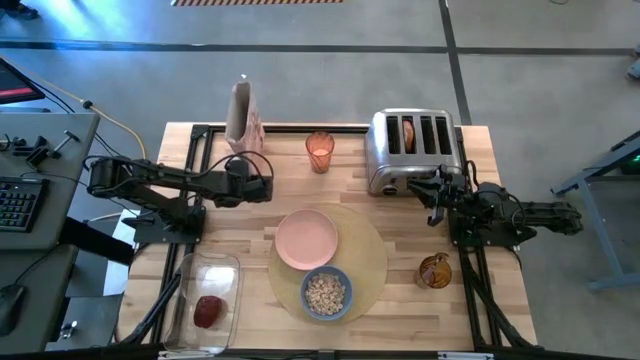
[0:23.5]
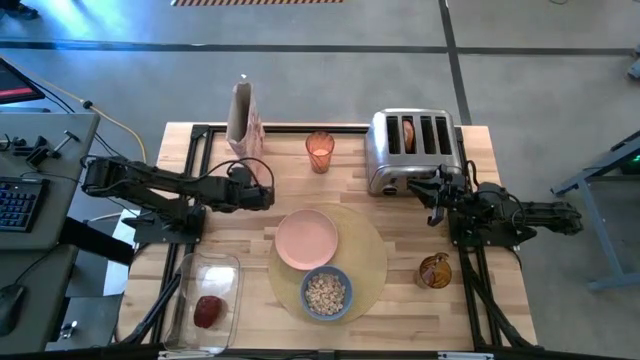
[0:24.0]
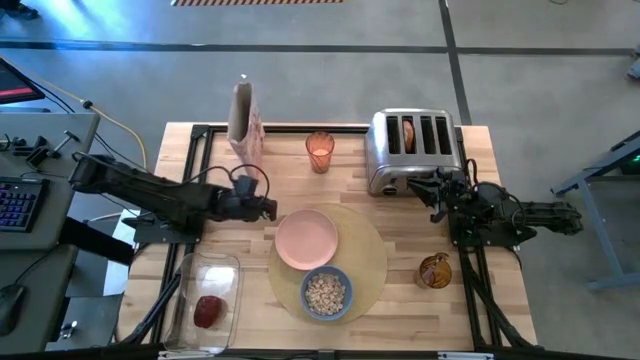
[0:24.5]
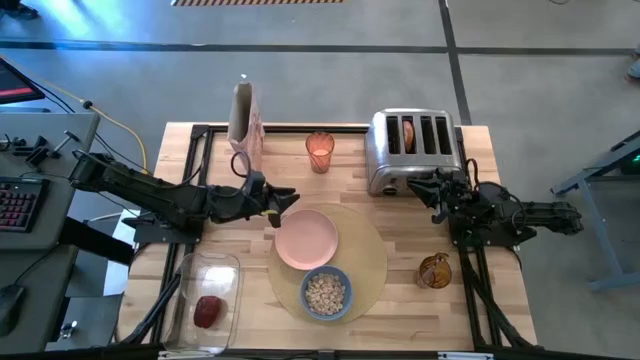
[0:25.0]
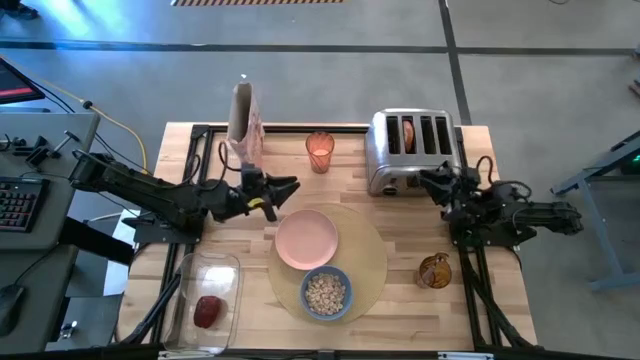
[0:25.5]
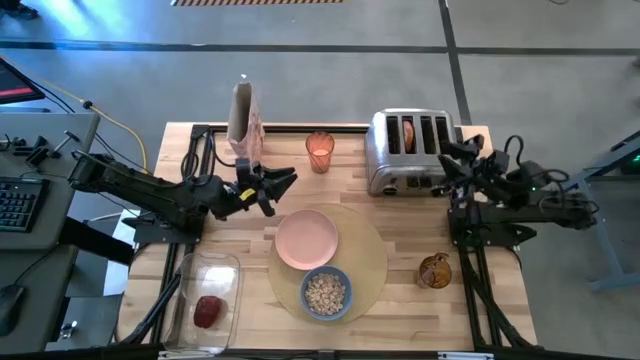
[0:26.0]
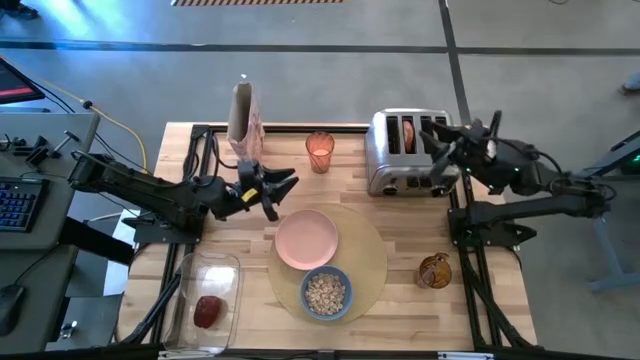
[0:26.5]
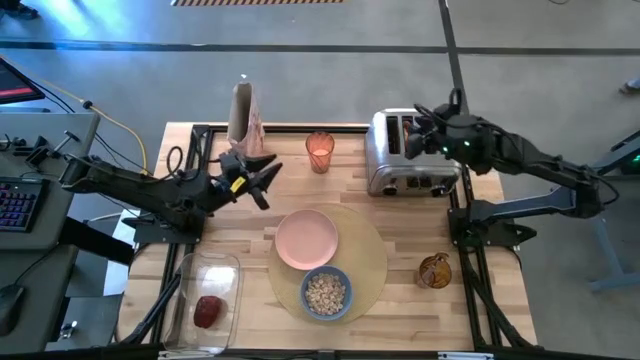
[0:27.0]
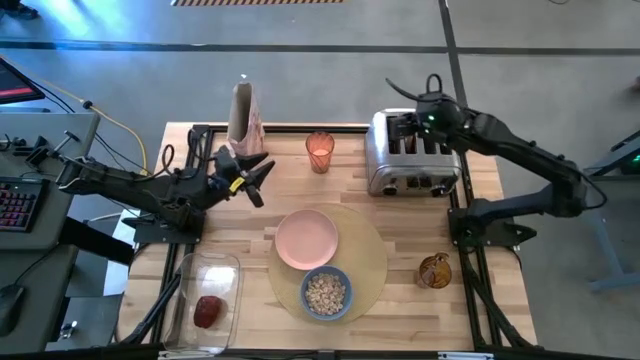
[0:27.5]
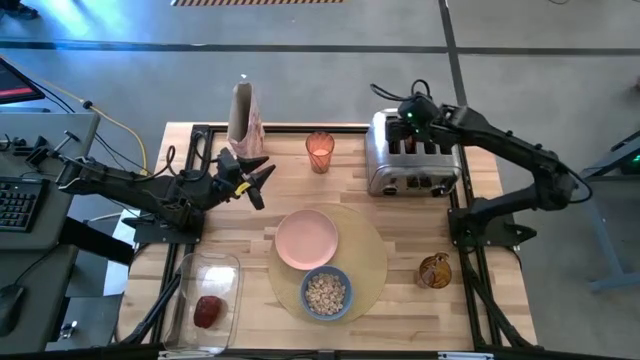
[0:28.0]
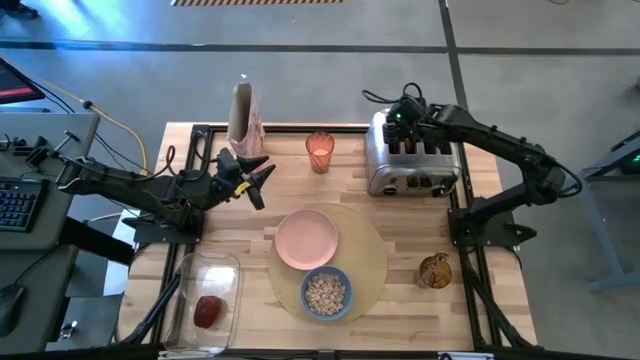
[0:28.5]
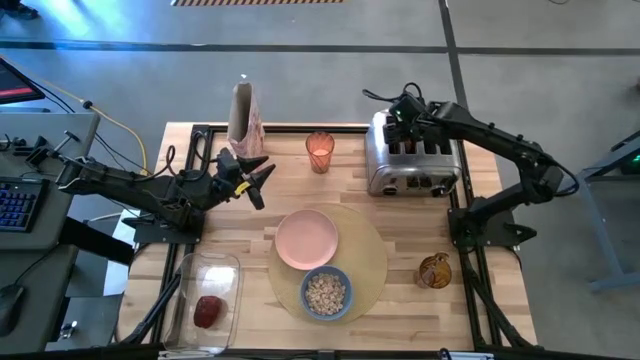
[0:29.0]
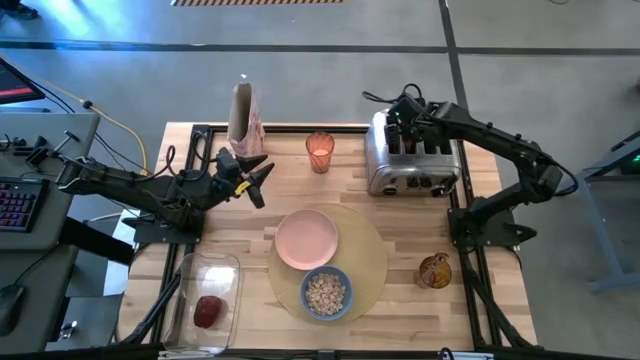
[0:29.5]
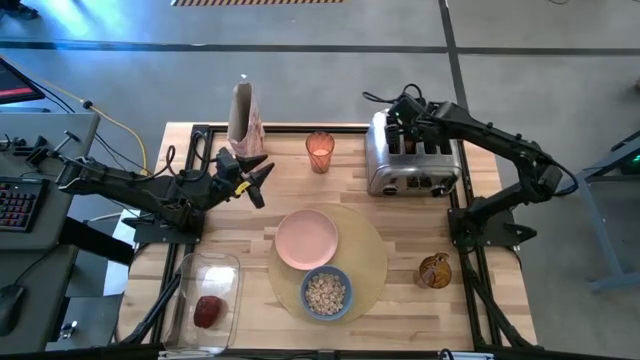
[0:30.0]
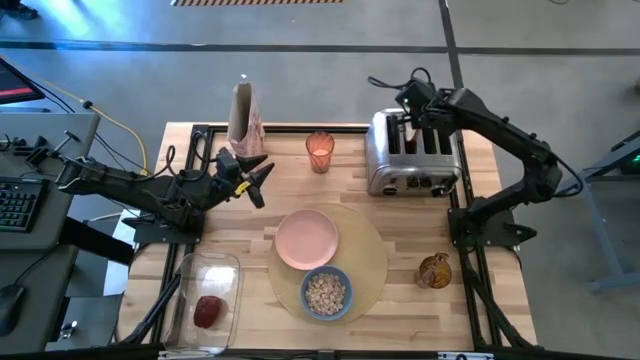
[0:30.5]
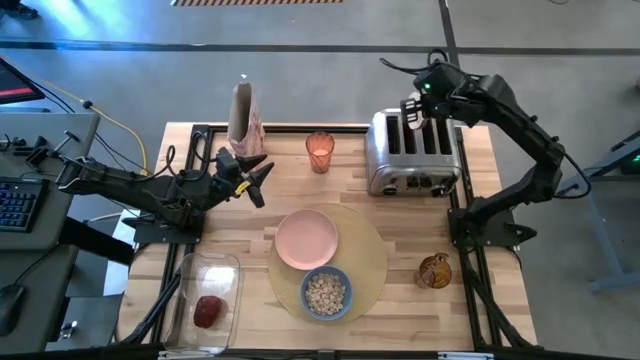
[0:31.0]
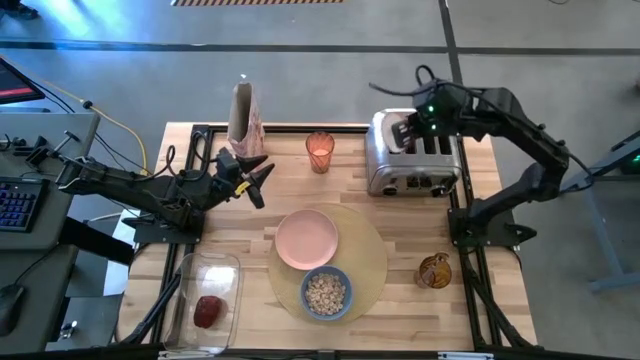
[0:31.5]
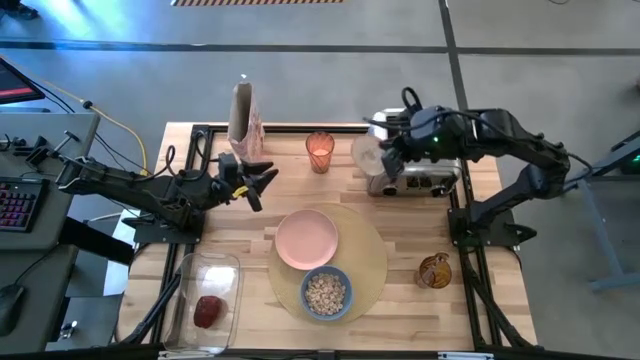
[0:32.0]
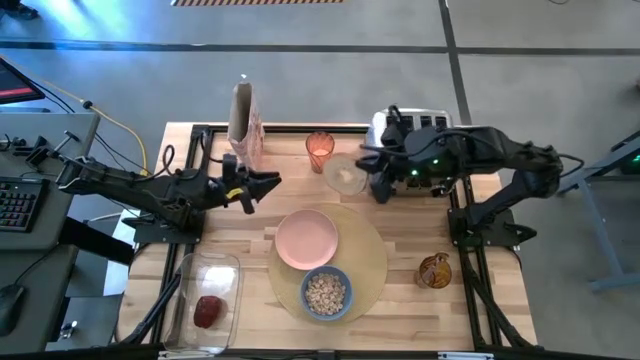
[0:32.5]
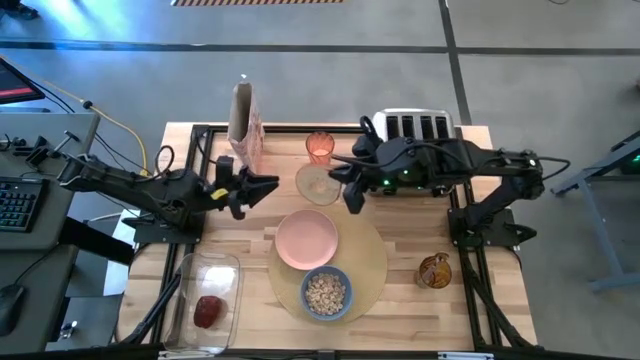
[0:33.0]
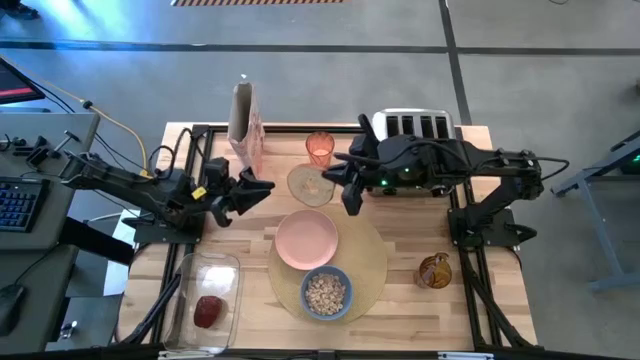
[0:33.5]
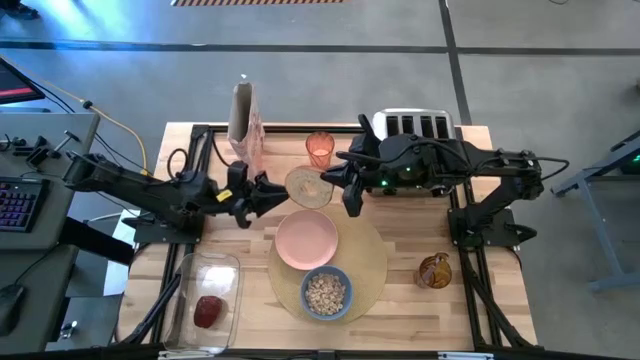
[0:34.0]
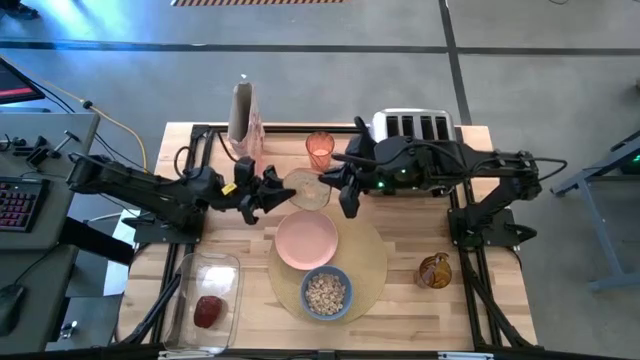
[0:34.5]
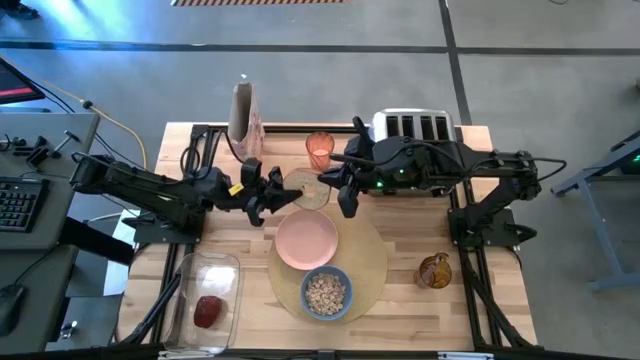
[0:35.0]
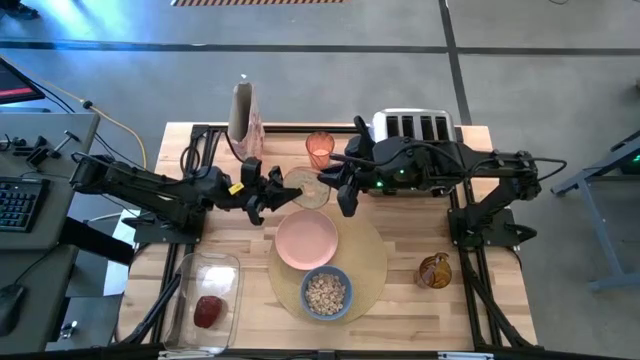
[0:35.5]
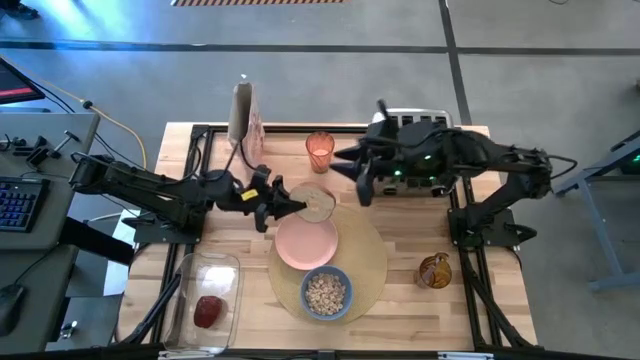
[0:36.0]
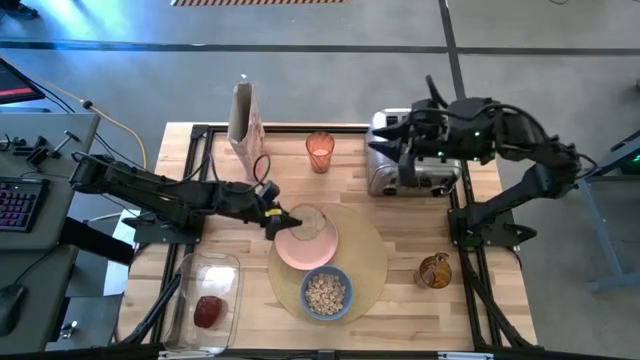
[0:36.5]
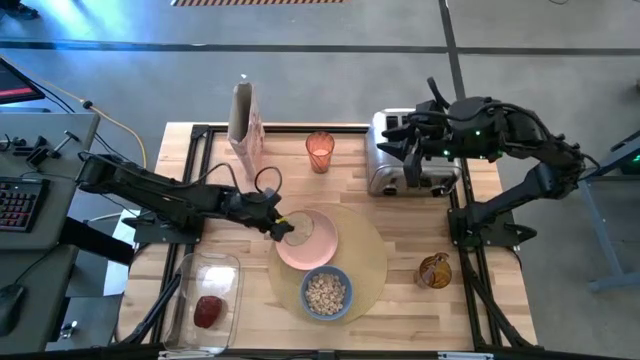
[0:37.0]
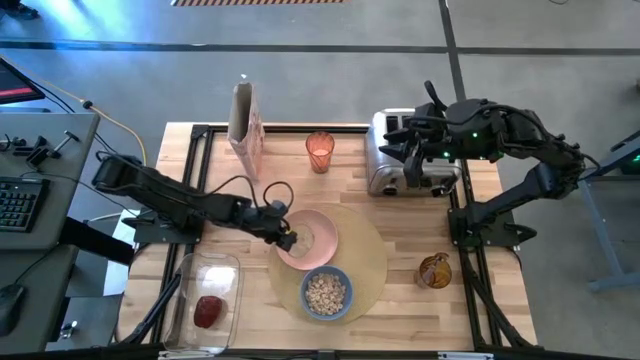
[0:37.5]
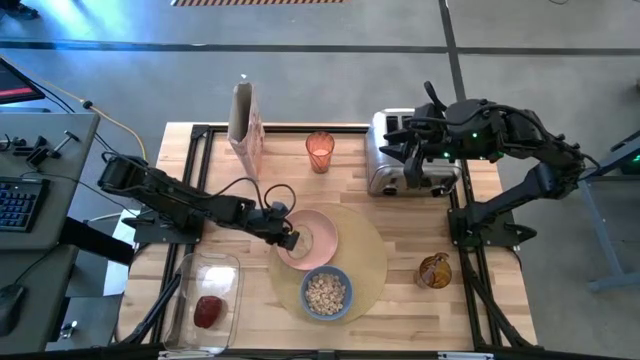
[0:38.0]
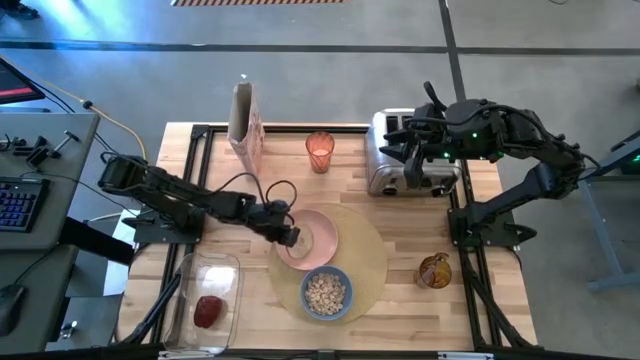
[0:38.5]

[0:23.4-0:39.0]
Task: Arrange a breakfast setting
Put the toasted bagel onto the peach plate

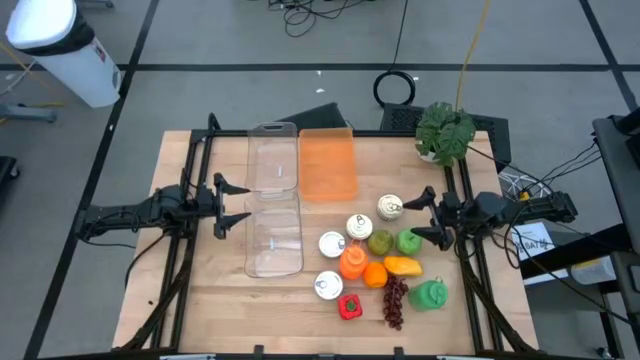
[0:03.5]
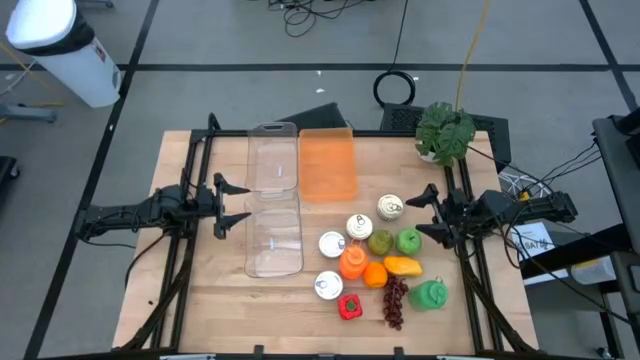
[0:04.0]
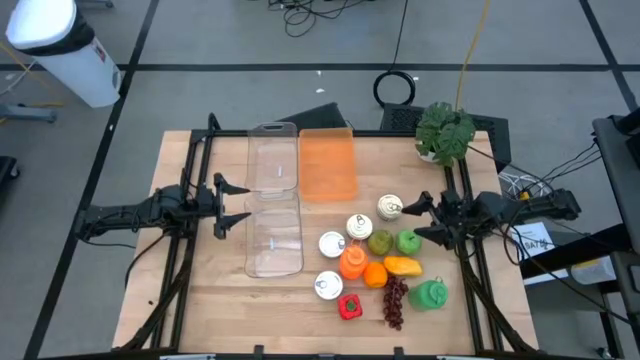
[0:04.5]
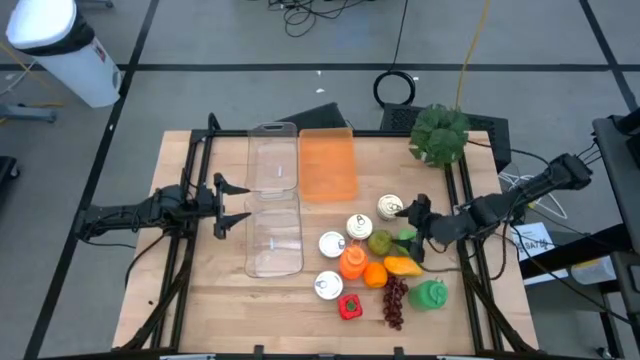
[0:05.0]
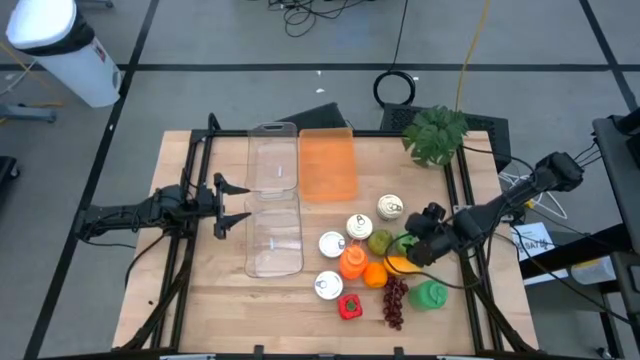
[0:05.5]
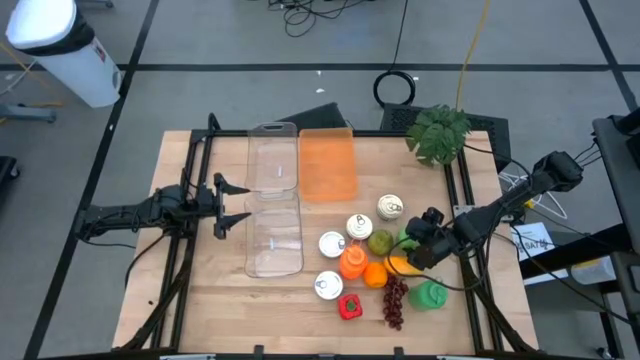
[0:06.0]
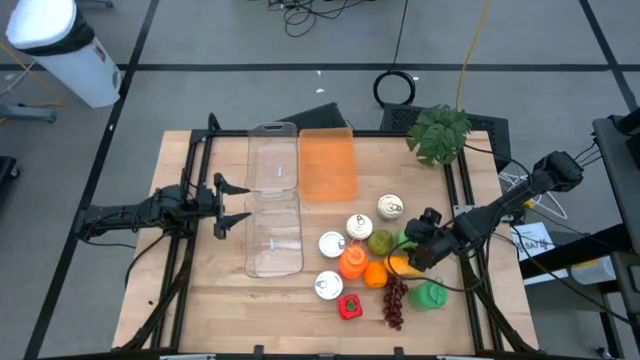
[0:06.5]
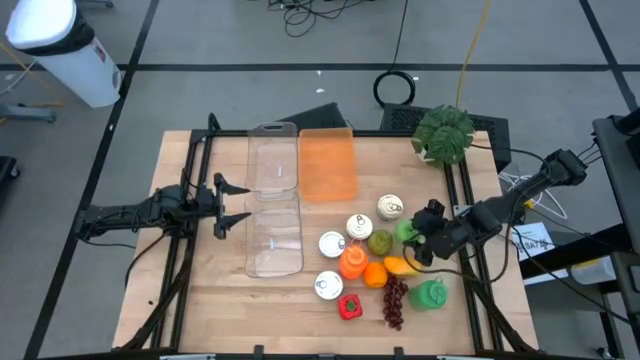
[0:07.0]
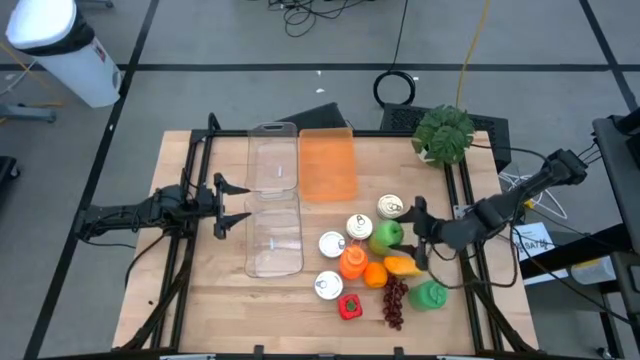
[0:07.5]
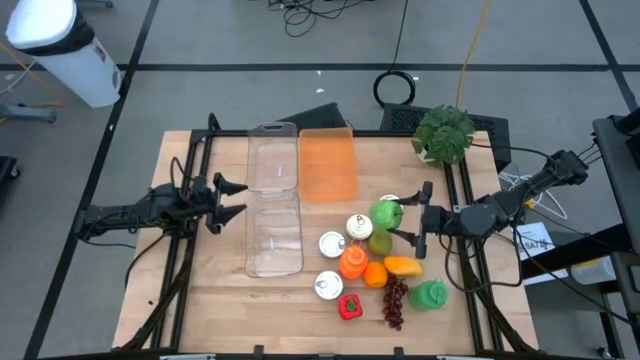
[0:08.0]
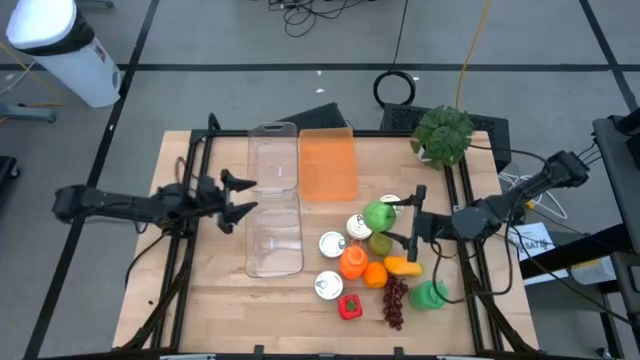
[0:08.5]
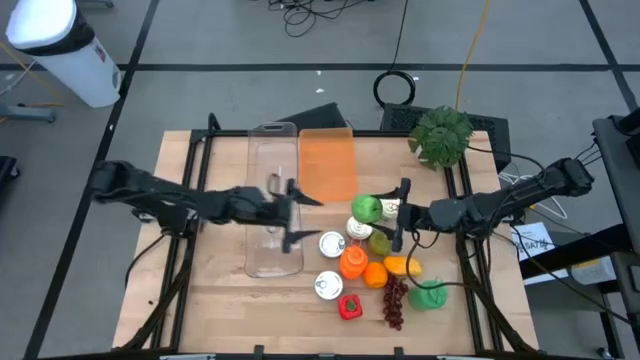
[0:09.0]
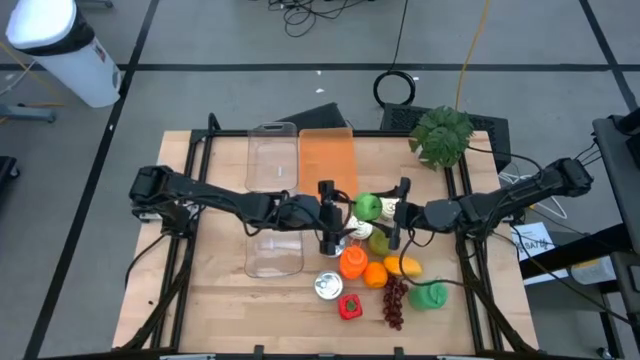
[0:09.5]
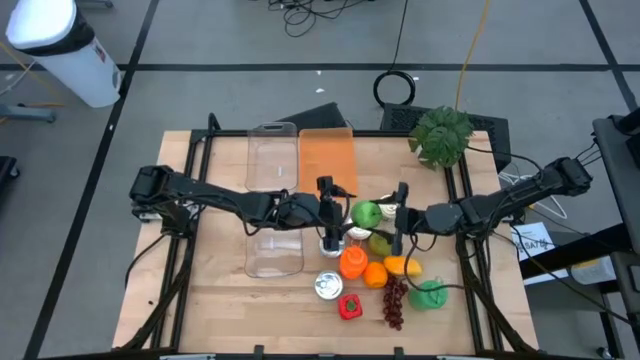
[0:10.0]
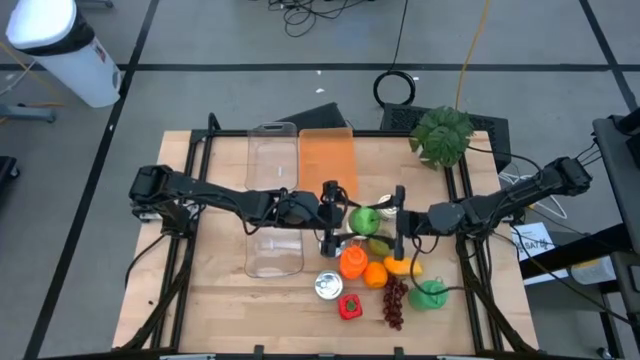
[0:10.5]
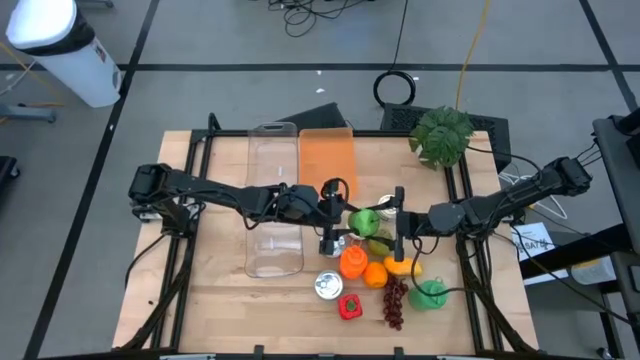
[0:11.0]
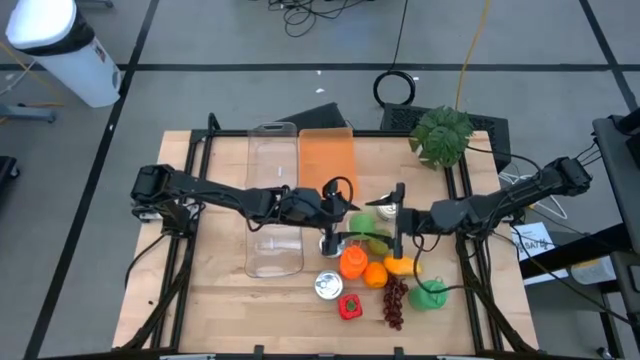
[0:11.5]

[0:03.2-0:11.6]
Task: Pick & Place Food Item
Put the green apple into the top transparent bin
